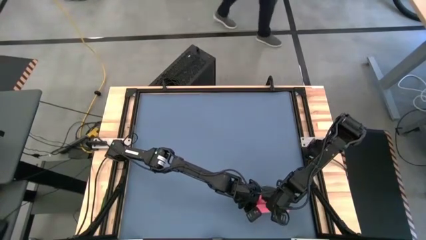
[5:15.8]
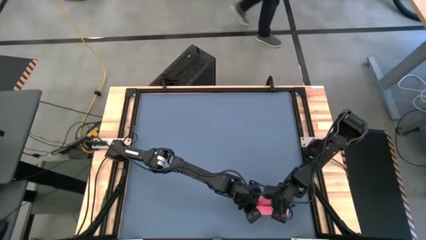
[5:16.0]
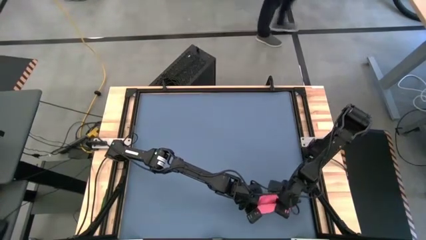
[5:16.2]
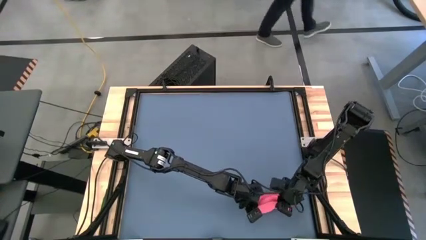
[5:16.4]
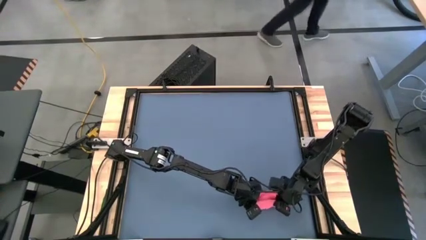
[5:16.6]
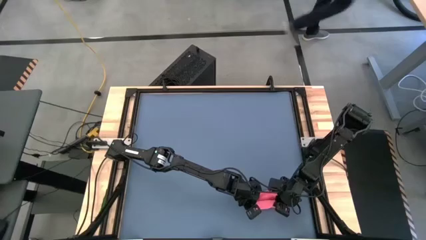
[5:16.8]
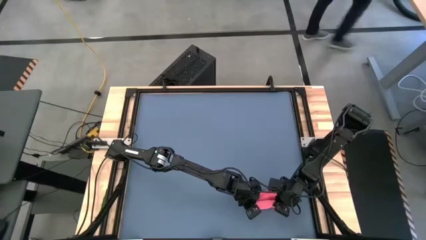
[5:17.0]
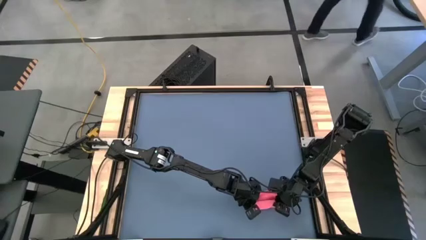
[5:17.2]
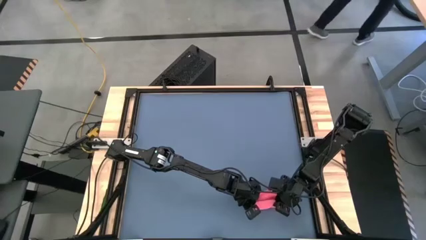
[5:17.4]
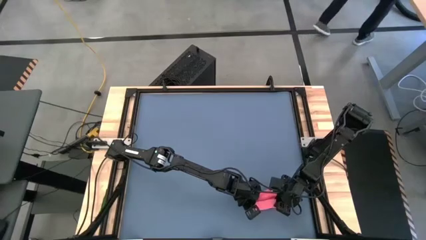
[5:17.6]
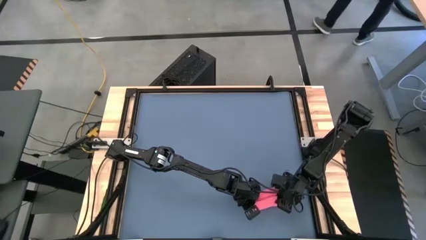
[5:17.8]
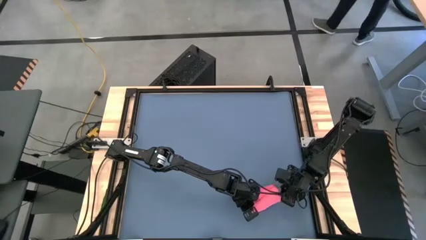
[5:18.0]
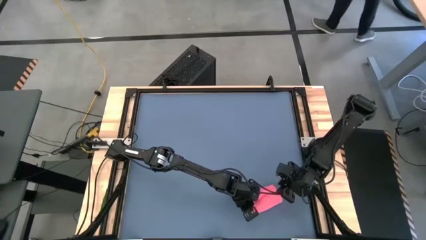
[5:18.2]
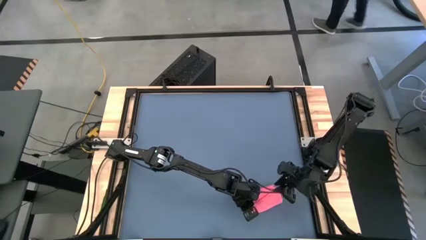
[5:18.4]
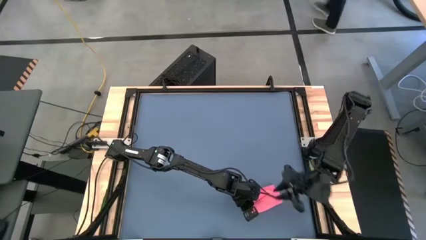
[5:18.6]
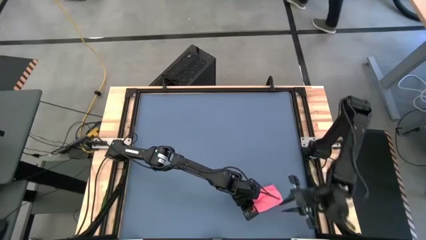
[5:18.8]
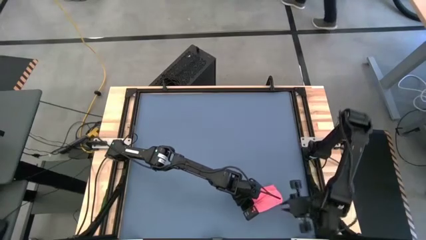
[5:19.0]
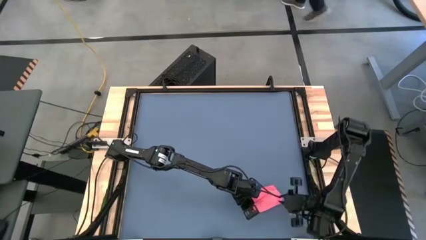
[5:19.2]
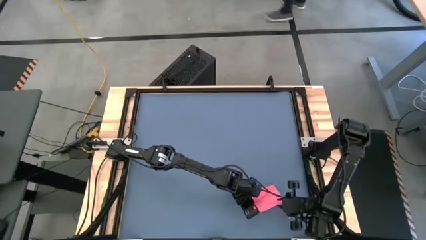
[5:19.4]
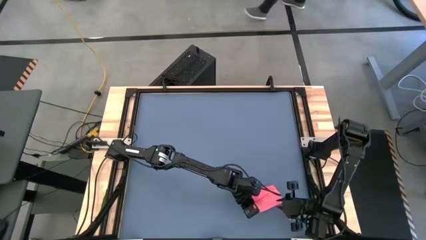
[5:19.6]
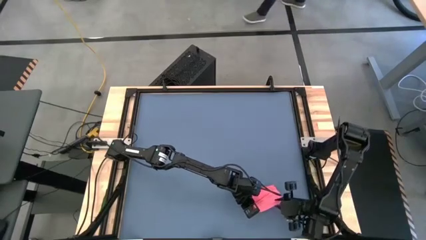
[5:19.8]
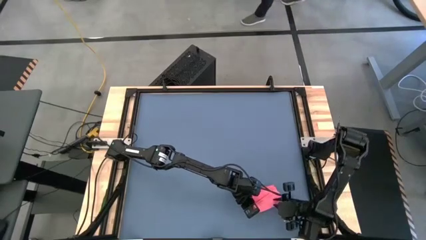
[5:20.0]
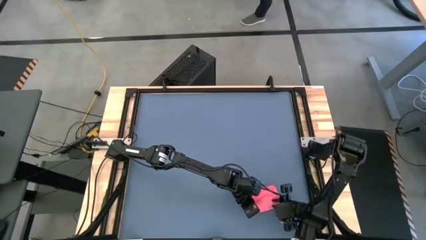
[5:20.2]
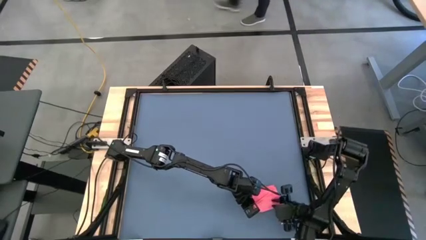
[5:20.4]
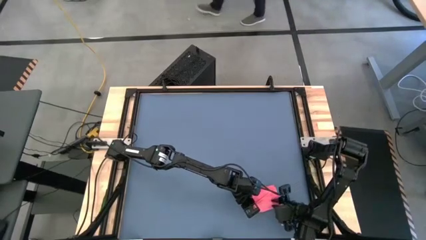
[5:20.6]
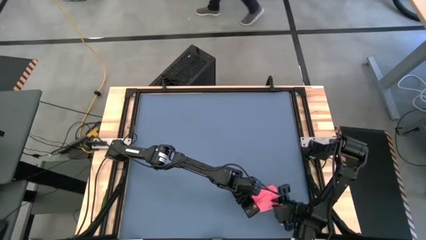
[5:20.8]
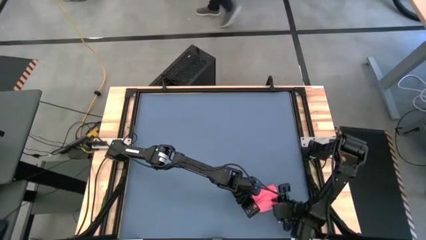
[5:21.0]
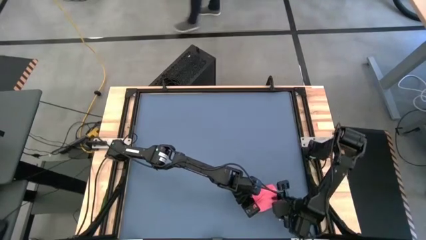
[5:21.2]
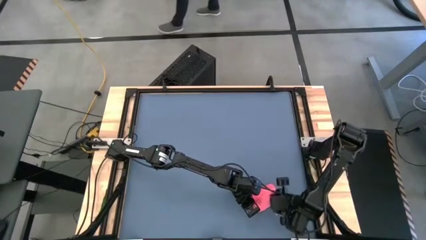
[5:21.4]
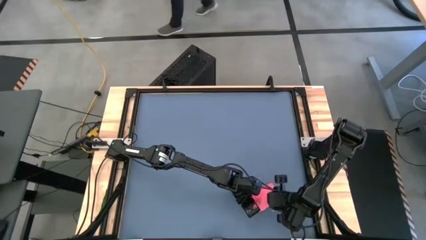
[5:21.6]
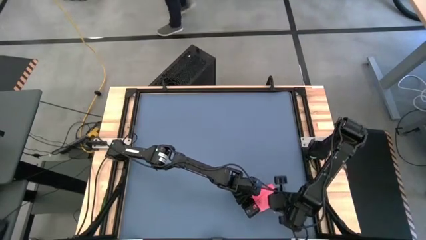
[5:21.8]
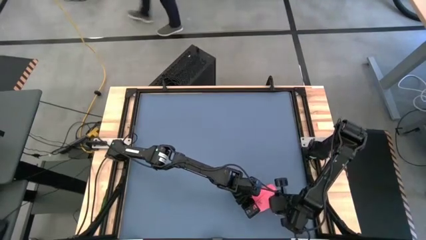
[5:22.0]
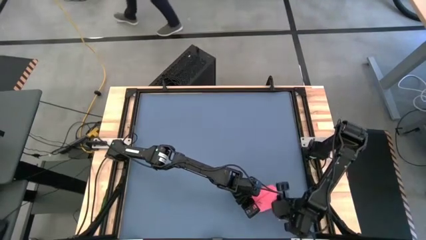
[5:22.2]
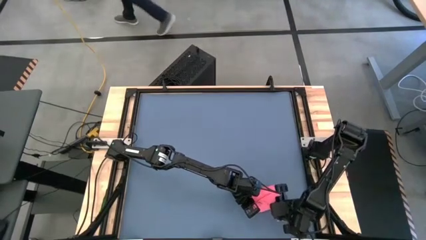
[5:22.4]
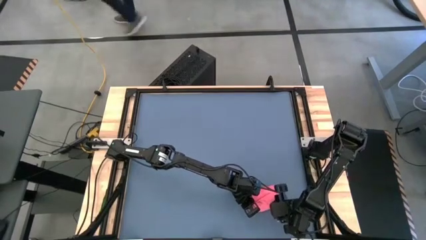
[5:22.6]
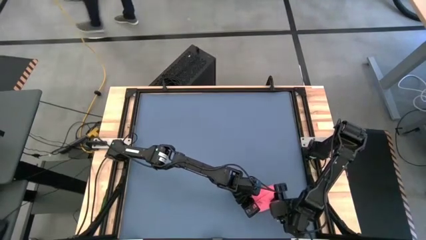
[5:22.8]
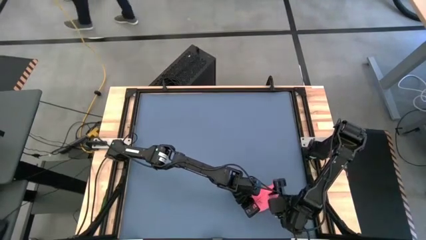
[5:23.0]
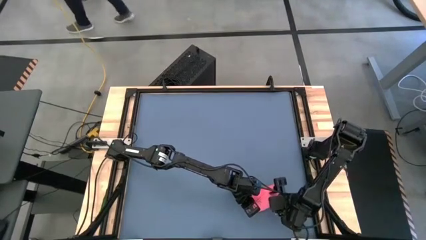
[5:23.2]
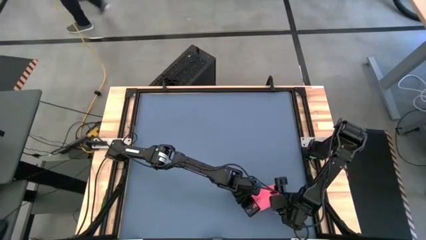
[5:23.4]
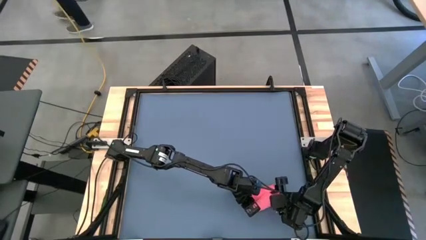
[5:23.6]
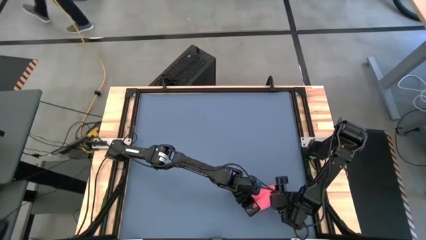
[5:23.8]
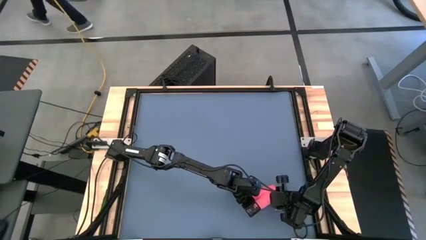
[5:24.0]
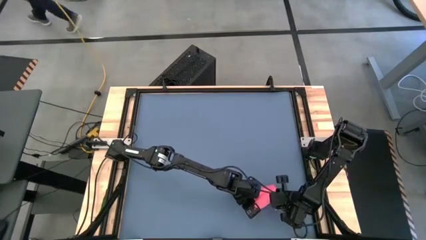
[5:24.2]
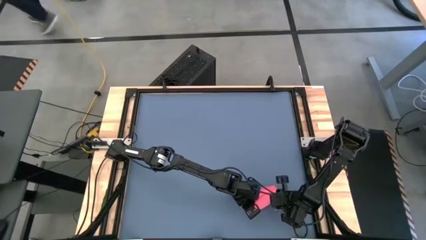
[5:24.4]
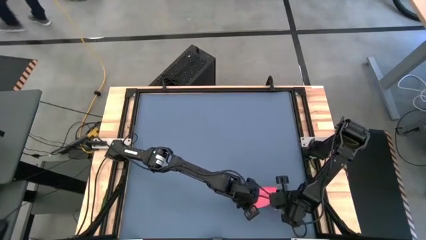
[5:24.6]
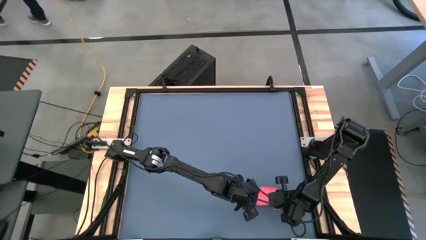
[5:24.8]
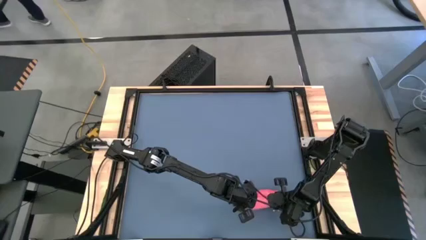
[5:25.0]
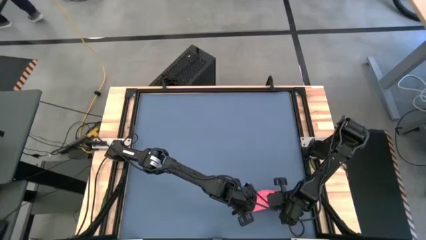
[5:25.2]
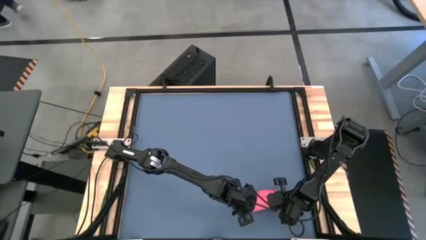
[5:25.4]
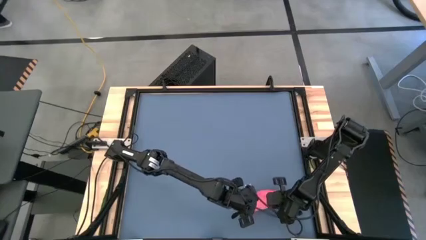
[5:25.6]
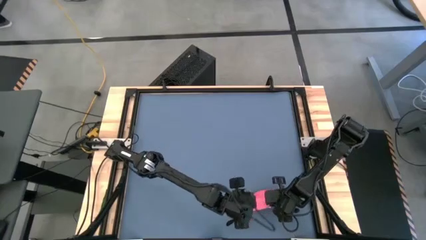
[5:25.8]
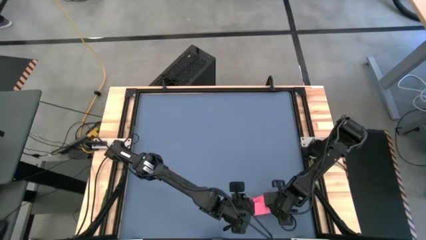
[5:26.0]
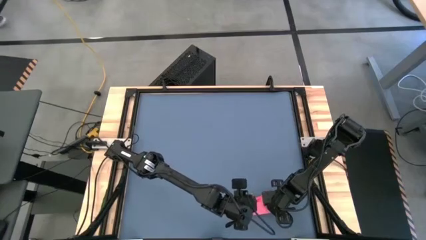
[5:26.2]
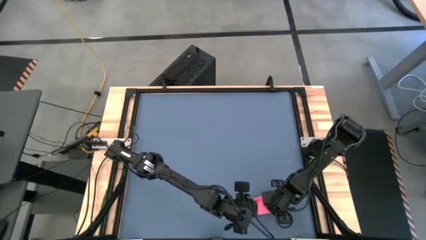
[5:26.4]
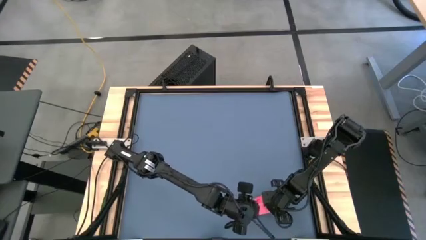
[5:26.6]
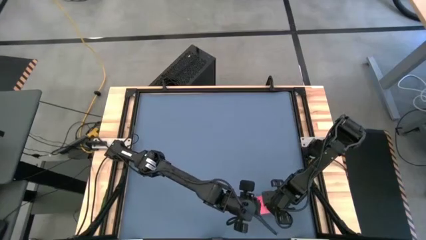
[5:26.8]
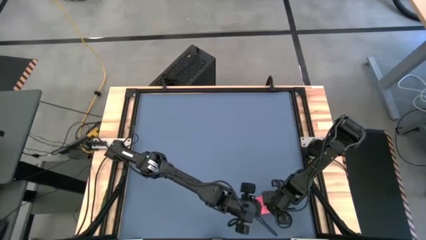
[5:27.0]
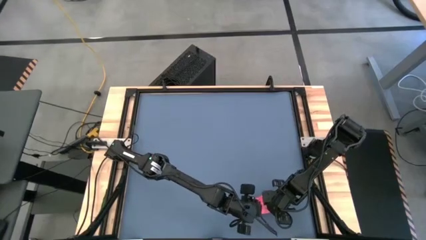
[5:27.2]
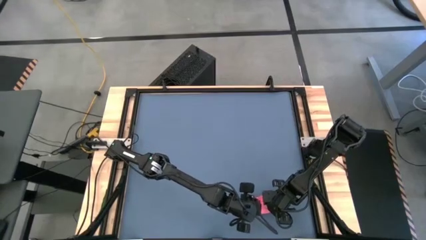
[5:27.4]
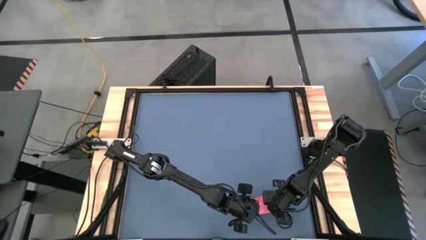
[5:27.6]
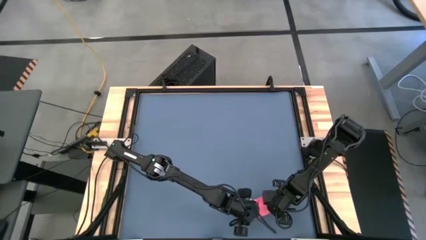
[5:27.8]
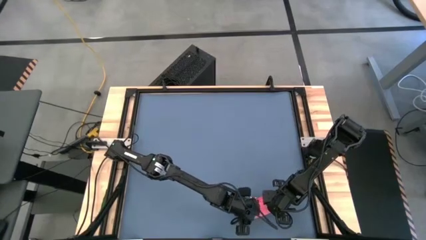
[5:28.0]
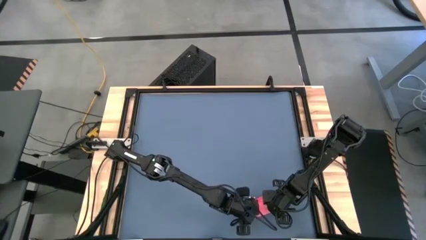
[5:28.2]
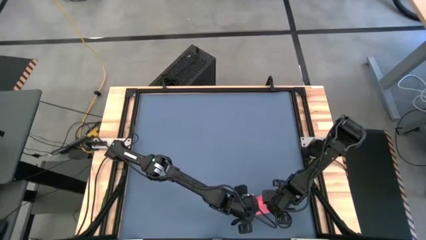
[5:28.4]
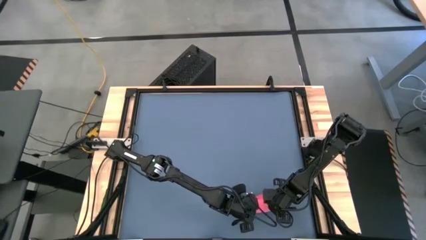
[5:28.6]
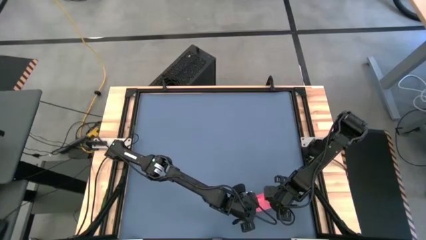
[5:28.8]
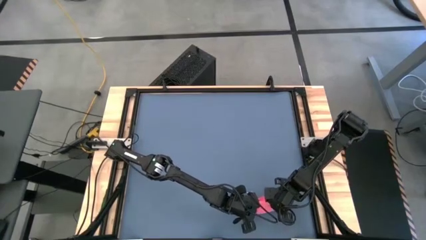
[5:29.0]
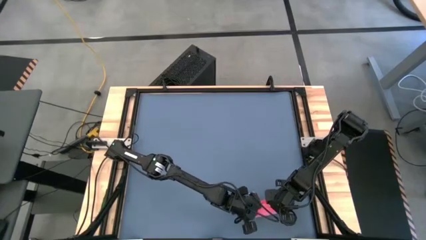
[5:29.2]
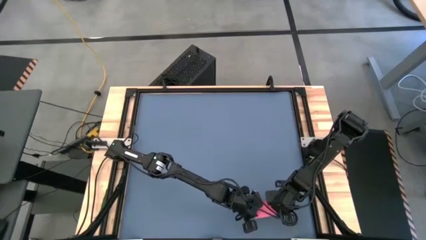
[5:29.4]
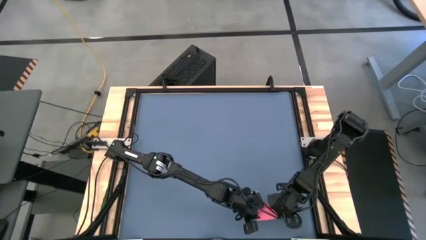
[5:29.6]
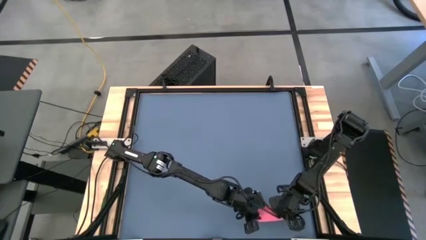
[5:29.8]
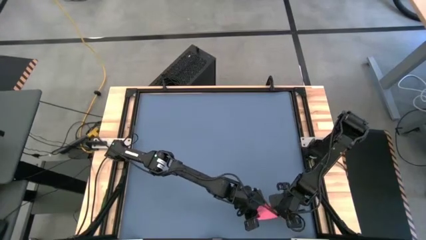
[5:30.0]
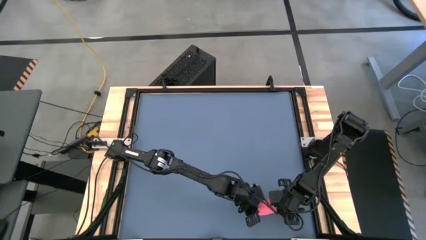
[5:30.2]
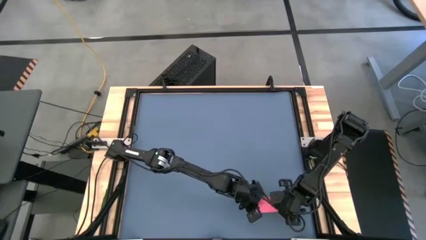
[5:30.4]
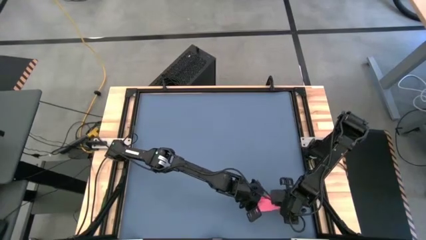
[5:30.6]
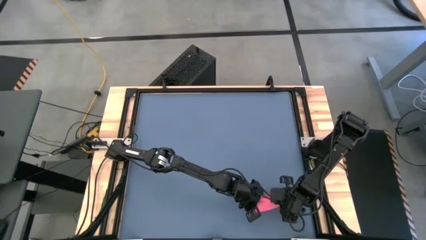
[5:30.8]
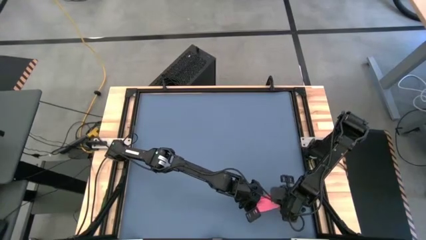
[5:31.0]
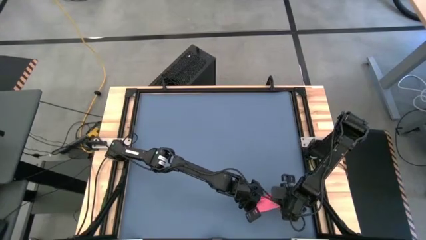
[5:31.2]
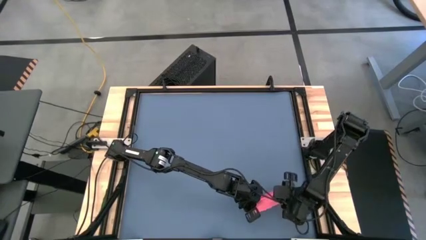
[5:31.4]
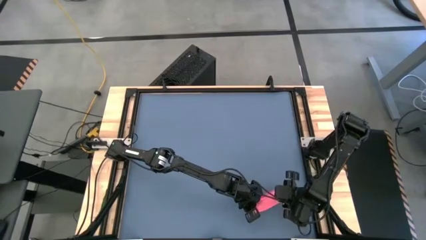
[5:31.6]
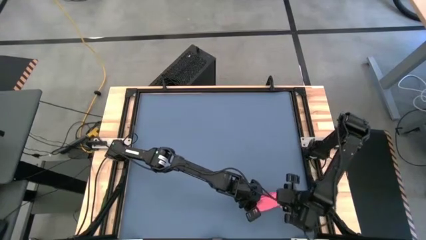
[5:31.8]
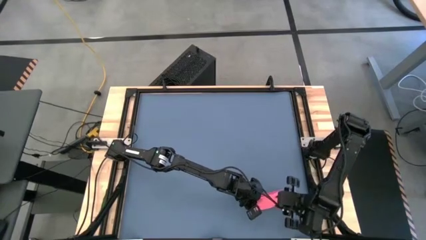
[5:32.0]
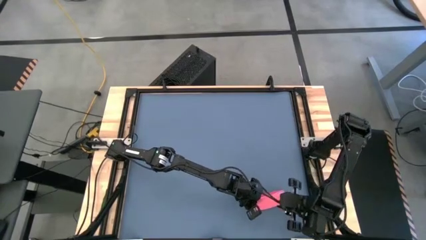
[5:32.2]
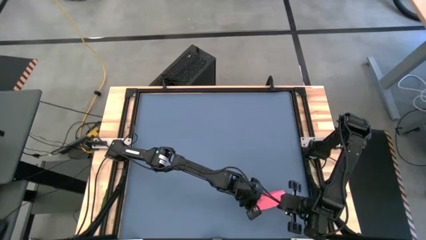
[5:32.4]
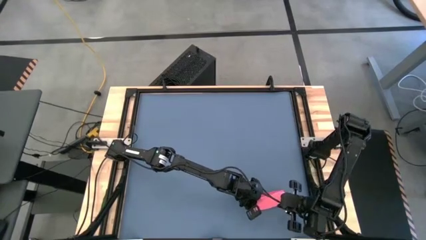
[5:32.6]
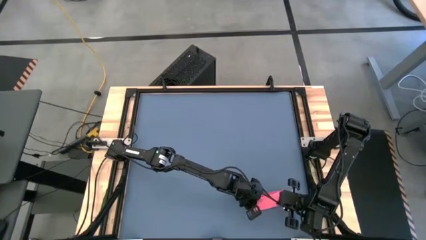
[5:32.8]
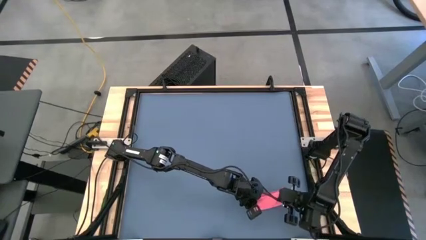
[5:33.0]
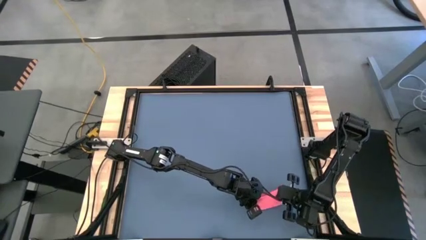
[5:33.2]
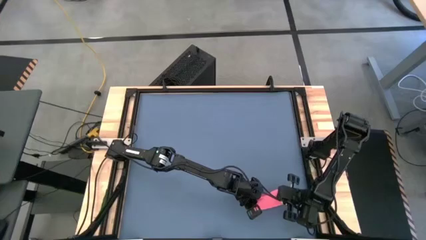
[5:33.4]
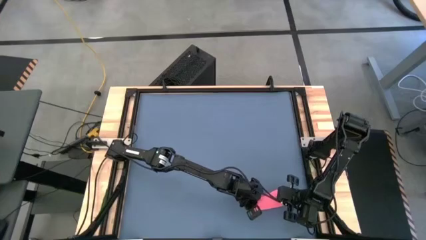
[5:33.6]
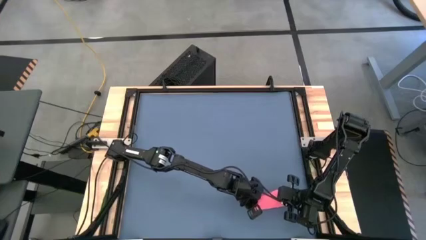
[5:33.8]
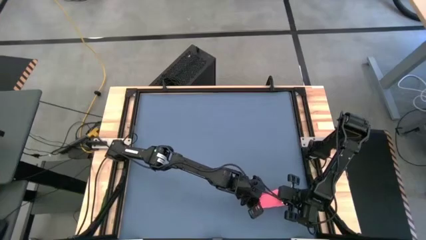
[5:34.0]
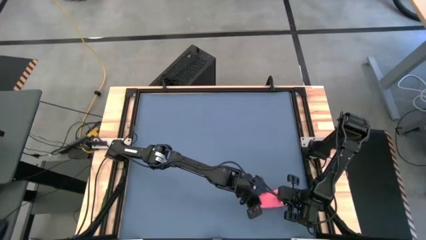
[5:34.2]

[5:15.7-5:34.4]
Task: Roll towel
Roll the pink towel
